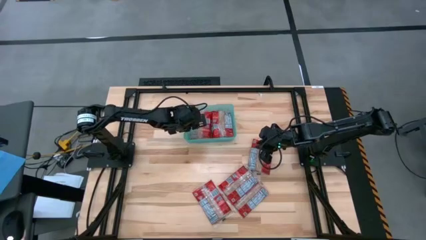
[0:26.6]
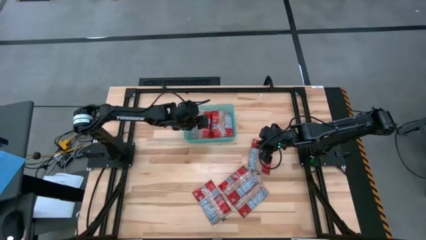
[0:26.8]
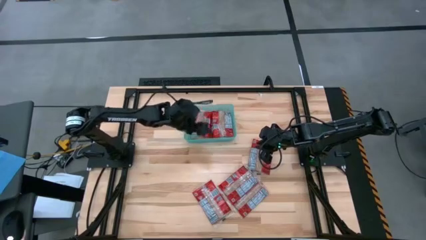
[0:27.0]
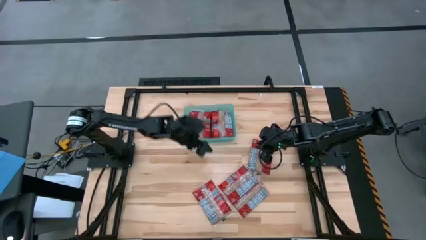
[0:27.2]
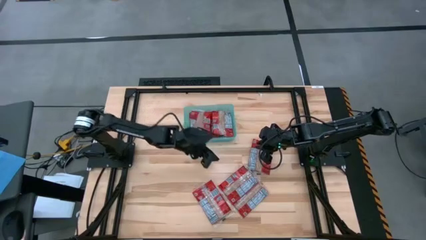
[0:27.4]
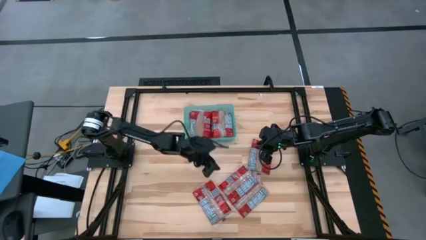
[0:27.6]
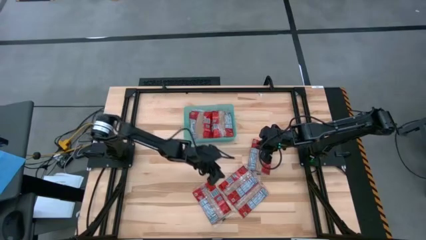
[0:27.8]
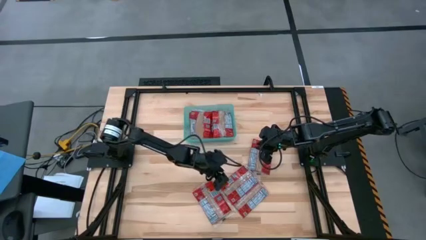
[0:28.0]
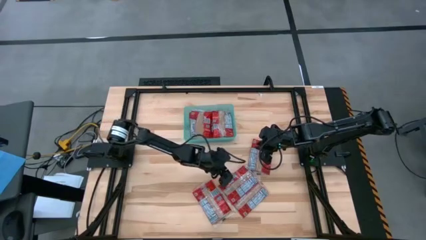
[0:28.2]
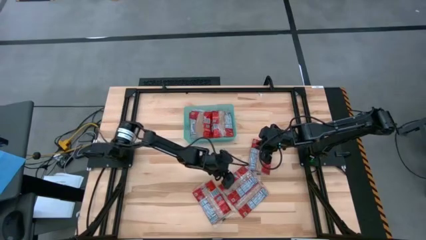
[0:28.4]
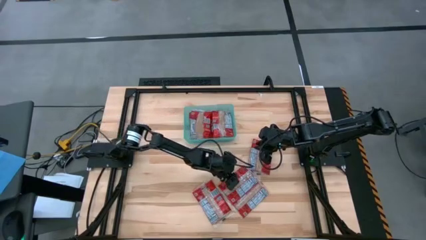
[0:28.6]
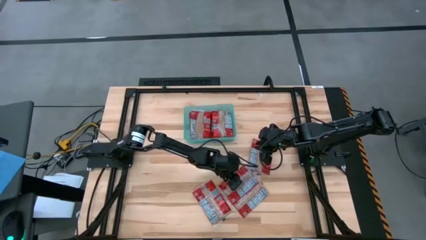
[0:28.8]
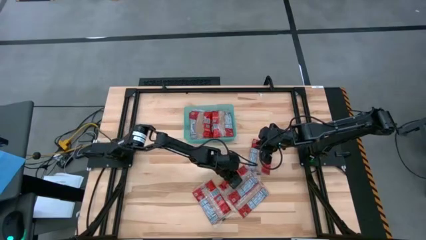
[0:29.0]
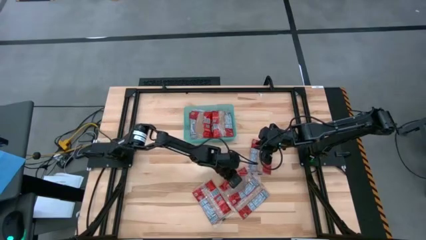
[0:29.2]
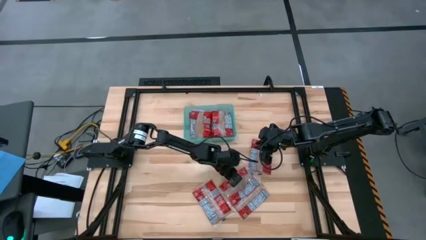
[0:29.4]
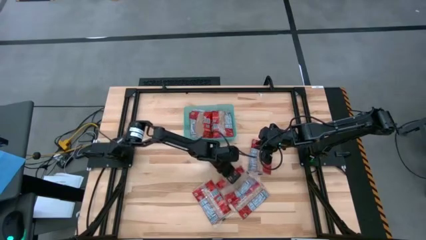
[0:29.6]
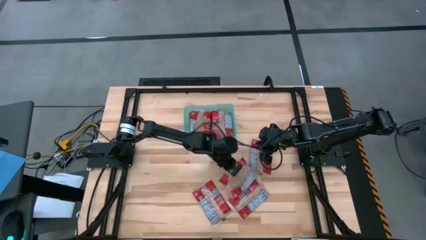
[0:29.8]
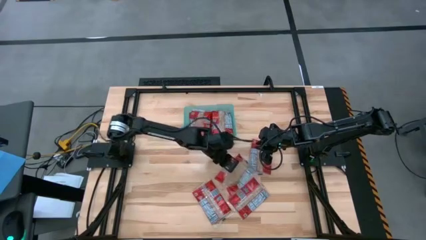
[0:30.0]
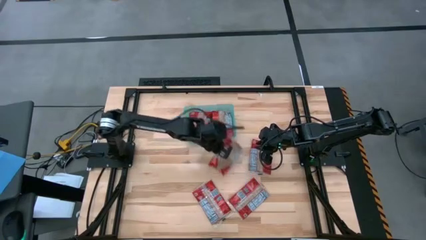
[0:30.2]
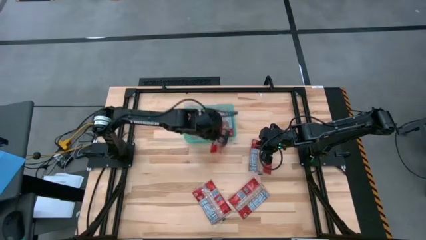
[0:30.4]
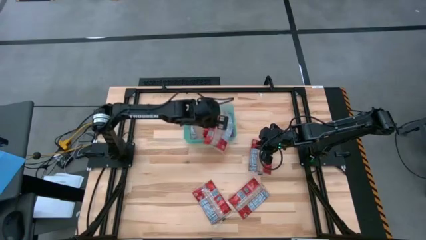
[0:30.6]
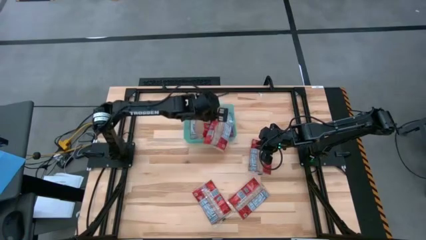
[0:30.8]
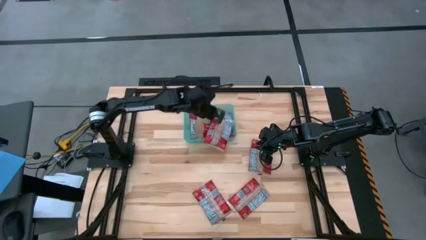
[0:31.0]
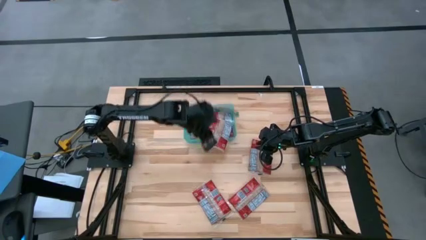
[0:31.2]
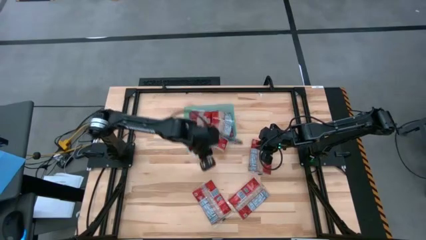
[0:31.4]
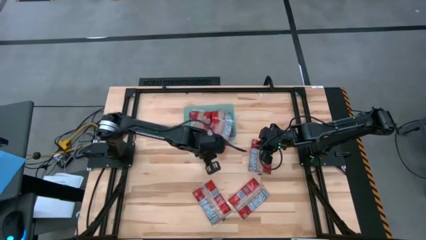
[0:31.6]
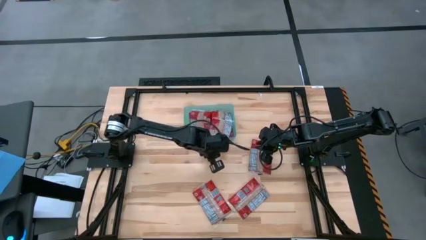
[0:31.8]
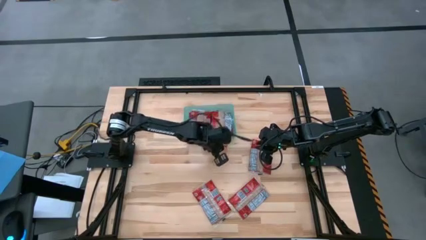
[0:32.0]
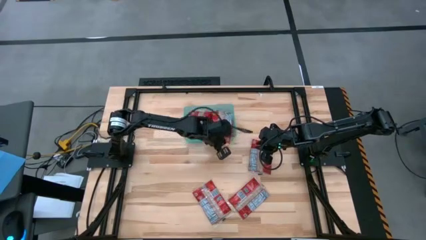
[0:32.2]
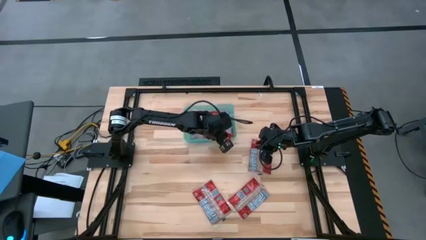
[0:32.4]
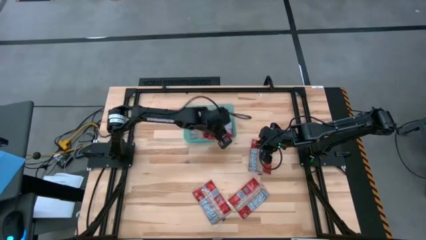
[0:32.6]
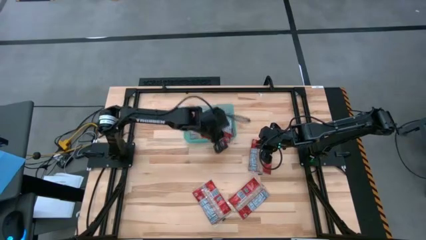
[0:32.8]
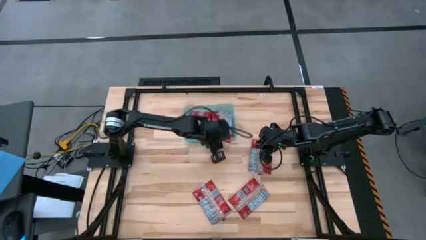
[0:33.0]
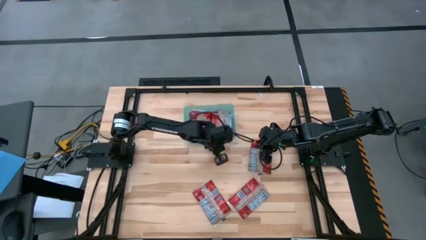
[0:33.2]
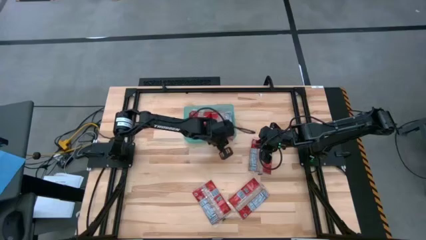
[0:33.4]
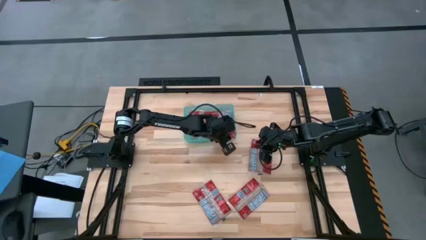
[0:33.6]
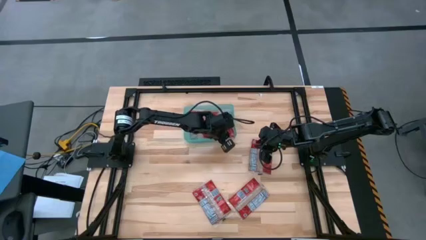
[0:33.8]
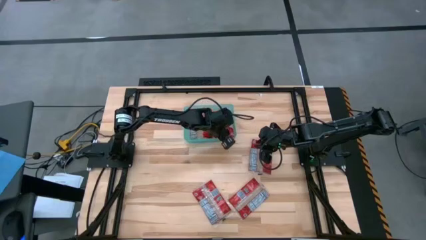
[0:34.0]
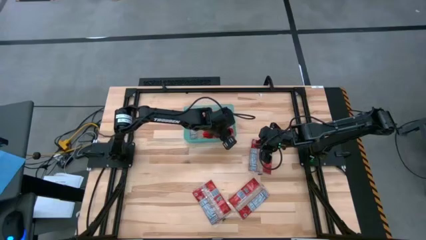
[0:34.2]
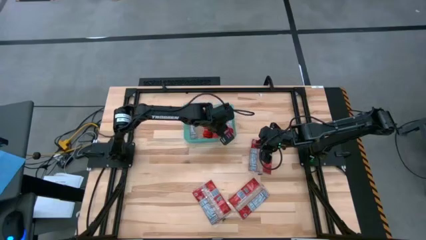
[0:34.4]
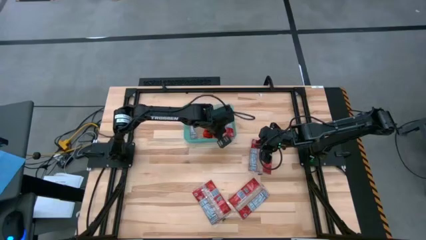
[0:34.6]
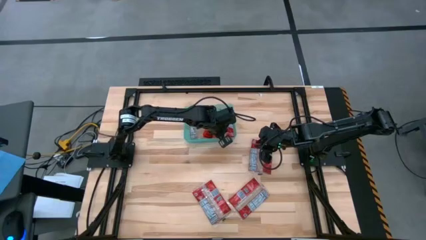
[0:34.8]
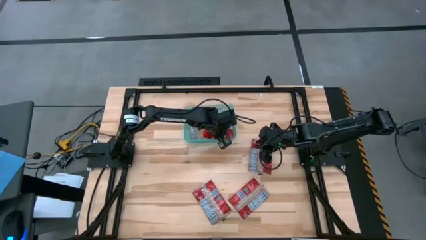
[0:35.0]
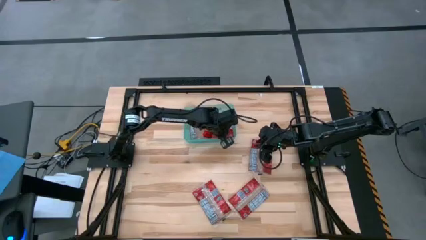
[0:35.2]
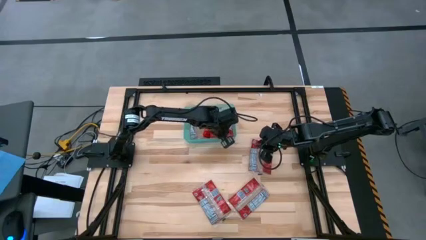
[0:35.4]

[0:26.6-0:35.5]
Task: Sort popcorn bags into baskets
Put the red popcorn bag into the blue bin

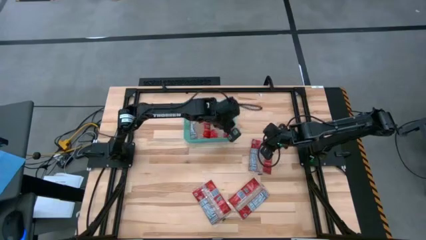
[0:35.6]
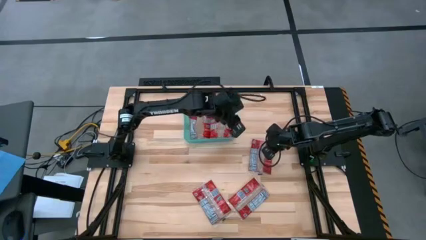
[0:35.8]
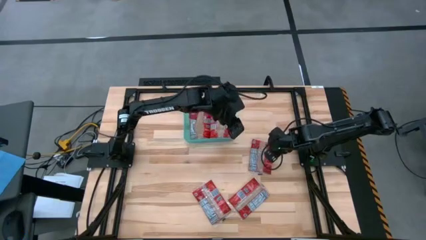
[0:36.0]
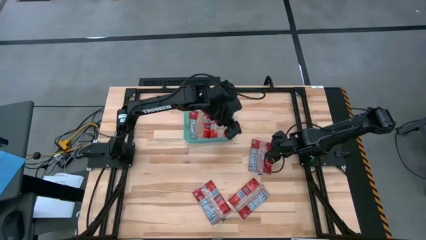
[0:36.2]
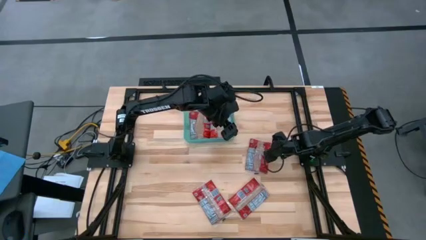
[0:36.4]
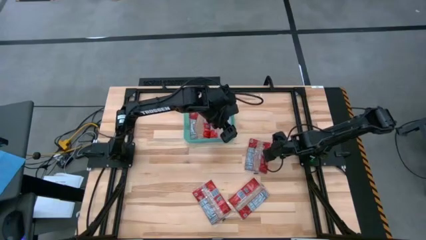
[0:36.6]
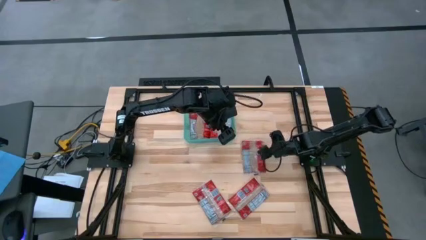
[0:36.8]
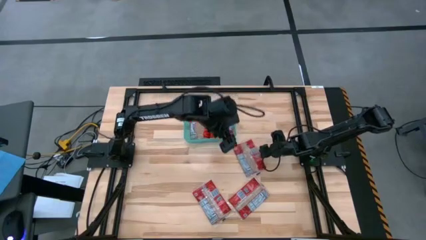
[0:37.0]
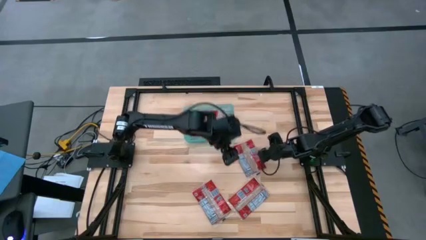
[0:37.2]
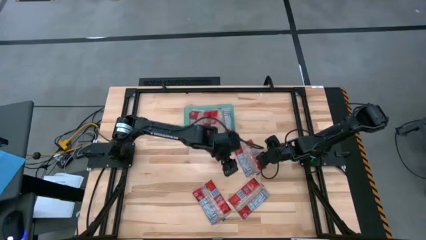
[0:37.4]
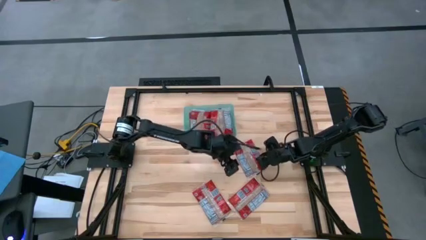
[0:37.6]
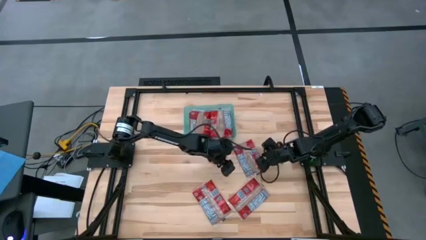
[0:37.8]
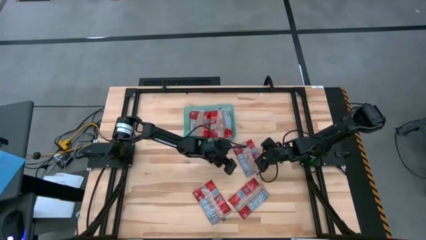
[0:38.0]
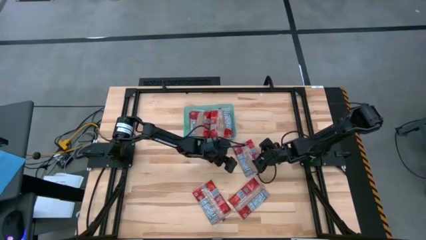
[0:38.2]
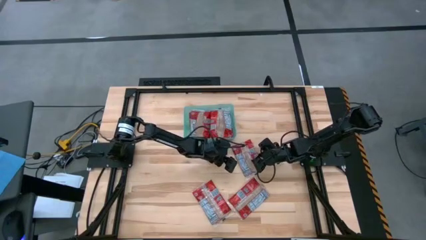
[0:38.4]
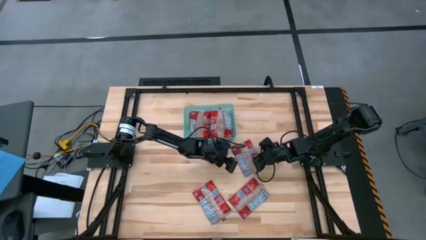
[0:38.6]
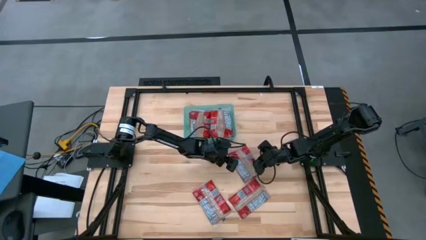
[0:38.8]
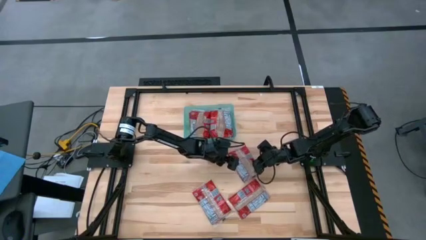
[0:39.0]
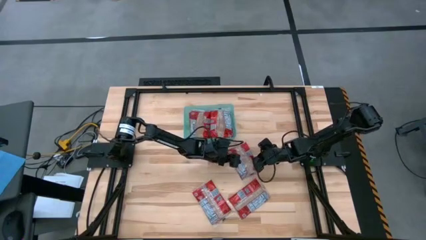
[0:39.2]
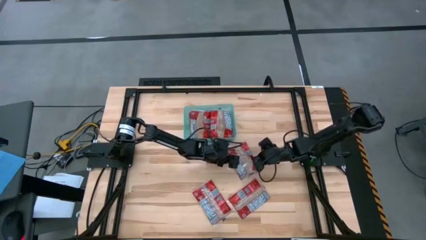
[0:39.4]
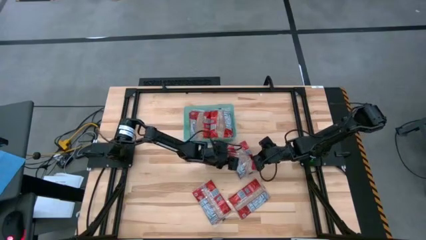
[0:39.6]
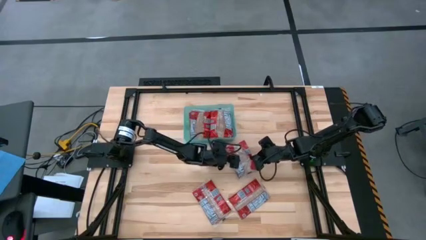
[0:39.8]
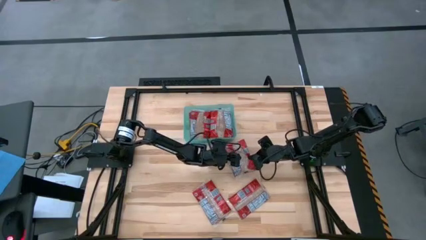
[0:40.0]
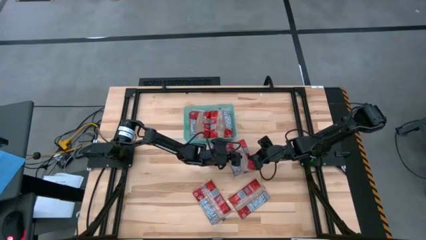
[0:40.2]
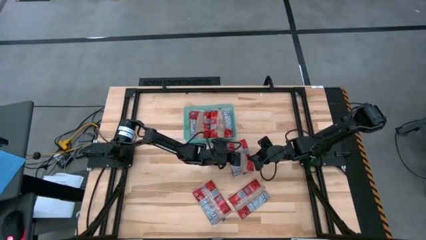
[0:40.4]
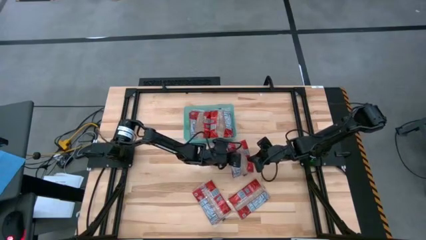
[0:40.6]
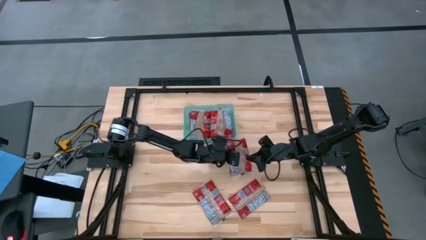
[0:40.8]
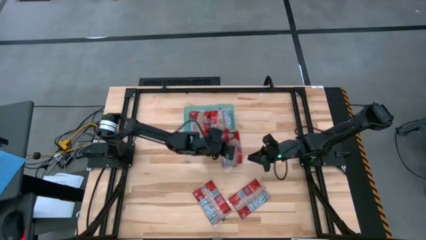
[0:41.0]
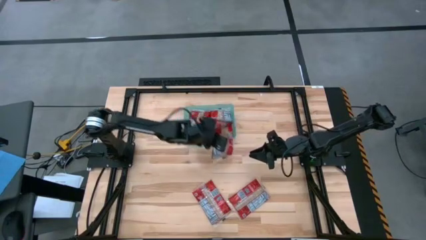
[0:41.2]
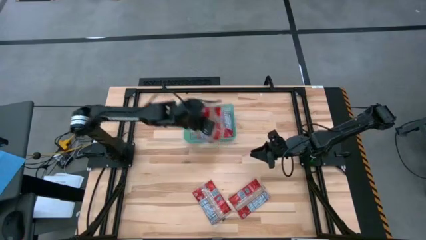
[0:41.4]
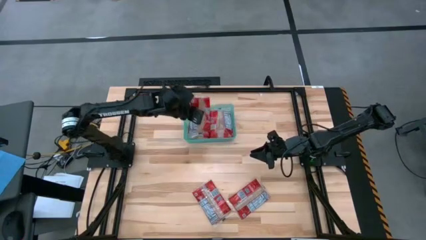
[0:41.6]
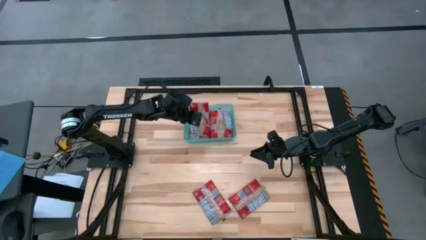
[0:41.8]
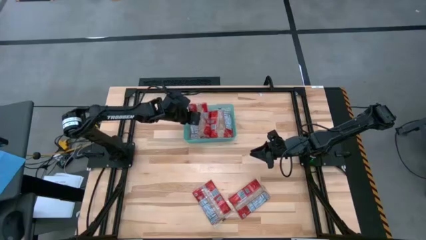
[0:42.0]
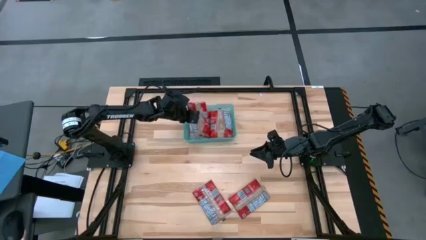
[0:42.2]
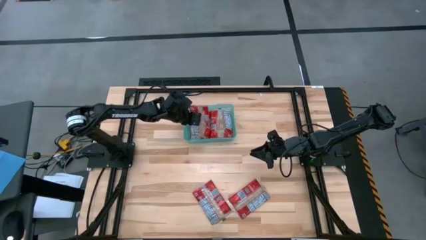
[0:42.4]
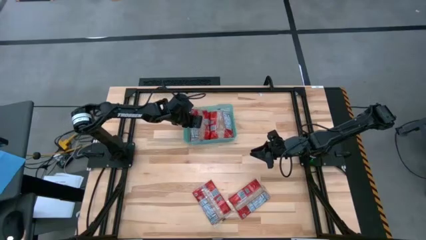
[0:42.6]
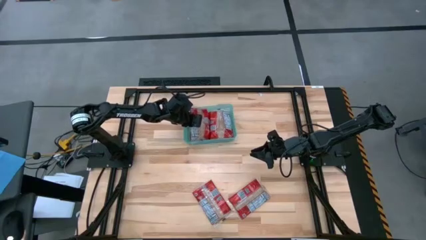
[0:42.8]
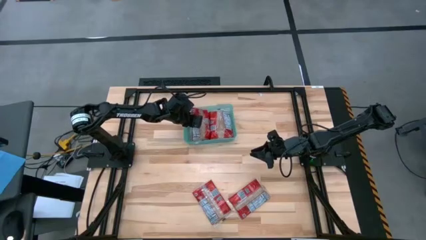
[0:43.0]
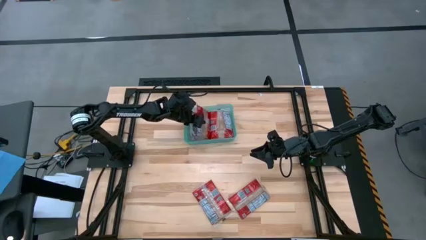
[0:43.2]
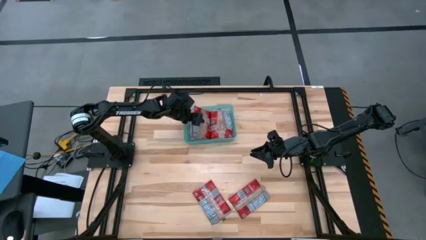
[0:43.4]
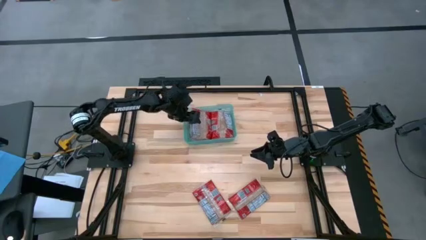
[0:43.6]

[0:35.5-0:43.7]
Put the red popcorn bag into the blue bin
